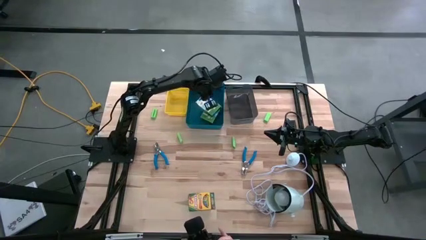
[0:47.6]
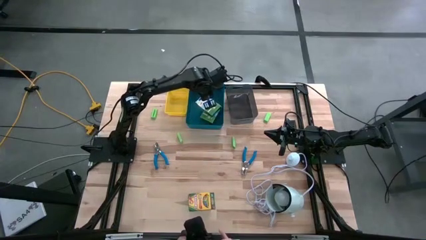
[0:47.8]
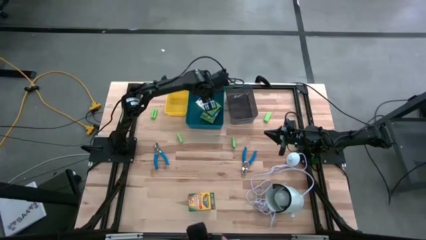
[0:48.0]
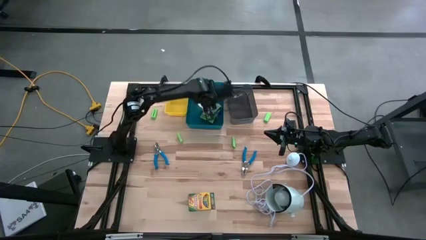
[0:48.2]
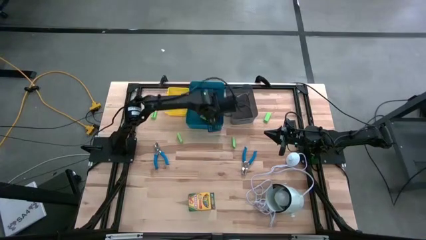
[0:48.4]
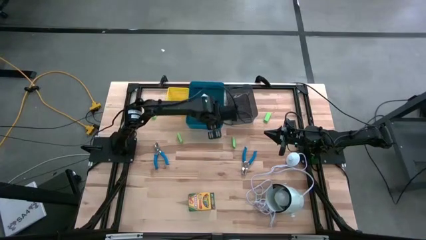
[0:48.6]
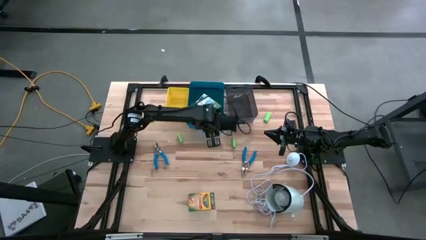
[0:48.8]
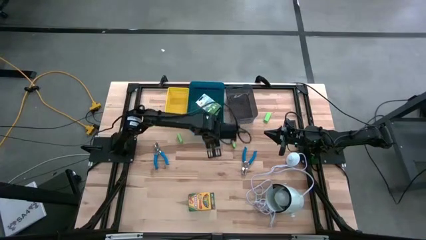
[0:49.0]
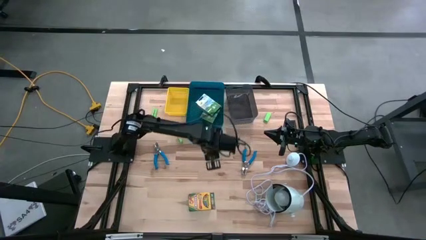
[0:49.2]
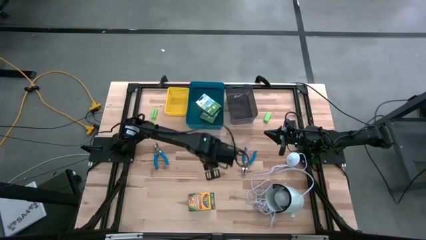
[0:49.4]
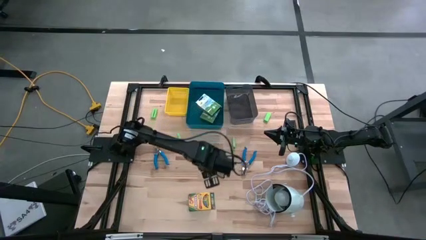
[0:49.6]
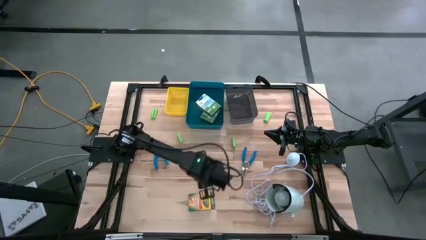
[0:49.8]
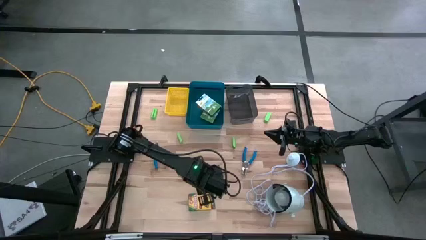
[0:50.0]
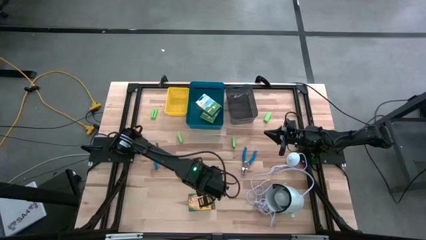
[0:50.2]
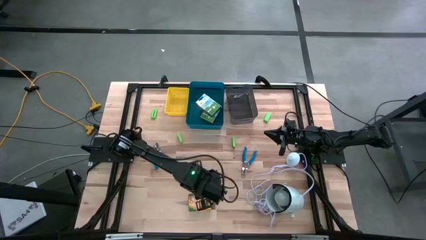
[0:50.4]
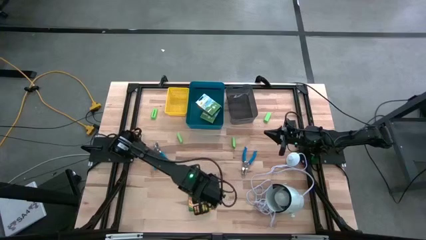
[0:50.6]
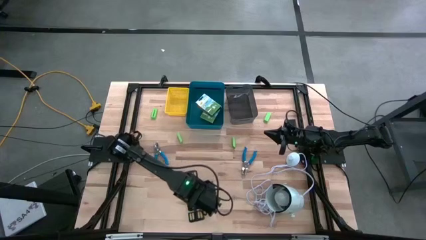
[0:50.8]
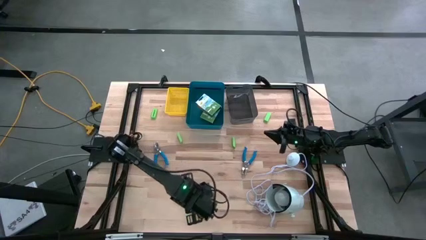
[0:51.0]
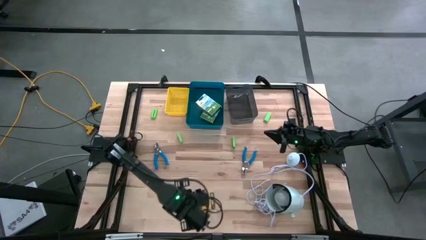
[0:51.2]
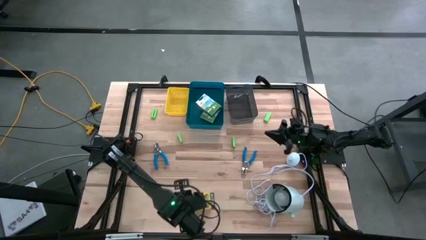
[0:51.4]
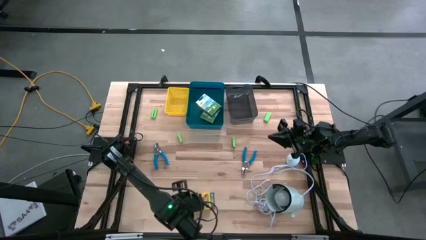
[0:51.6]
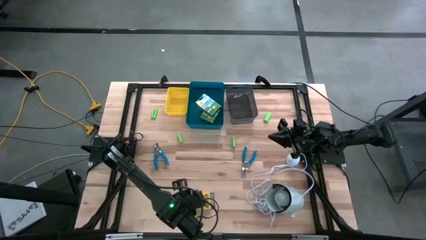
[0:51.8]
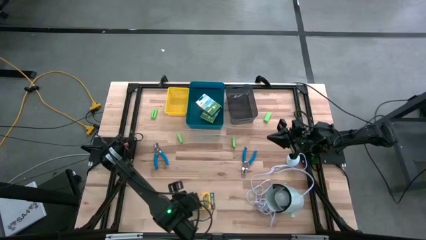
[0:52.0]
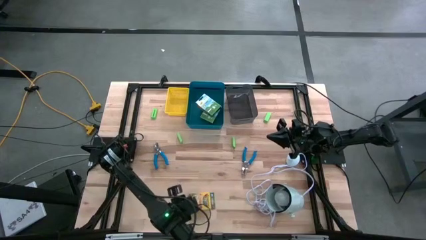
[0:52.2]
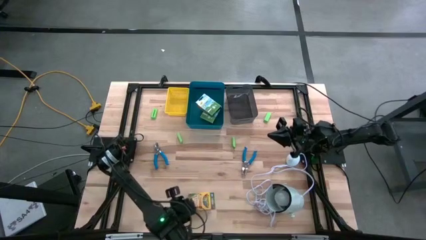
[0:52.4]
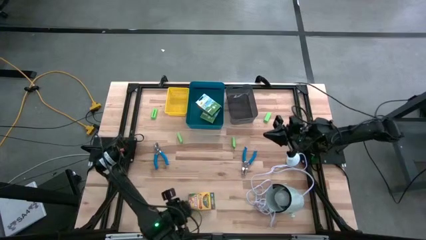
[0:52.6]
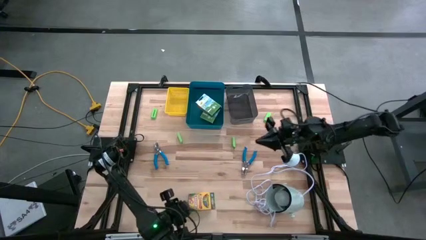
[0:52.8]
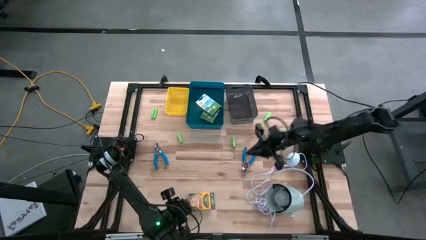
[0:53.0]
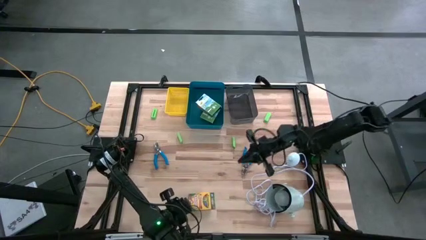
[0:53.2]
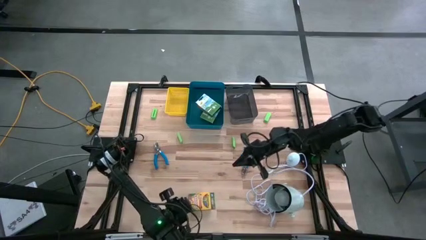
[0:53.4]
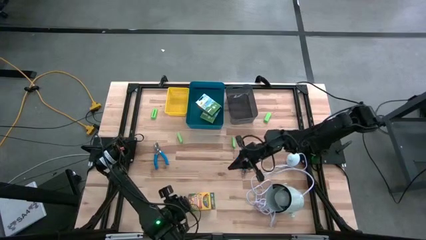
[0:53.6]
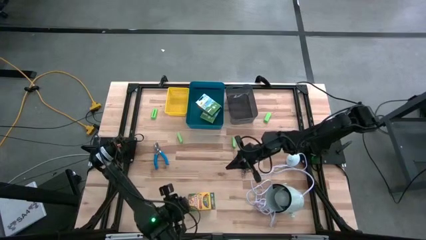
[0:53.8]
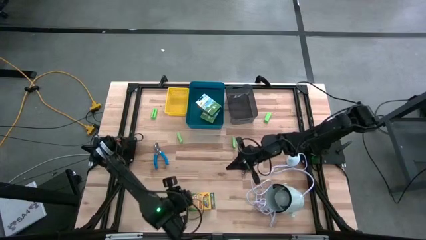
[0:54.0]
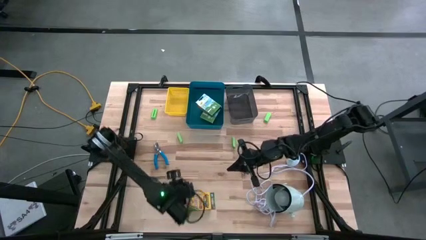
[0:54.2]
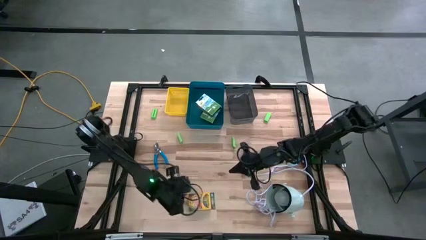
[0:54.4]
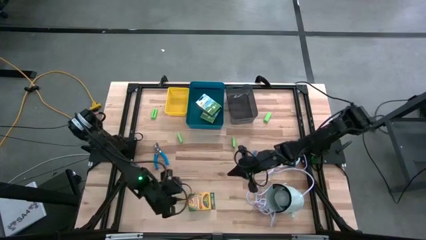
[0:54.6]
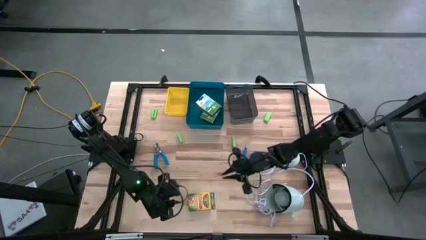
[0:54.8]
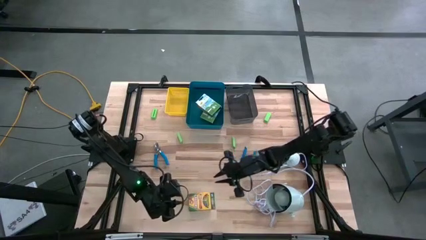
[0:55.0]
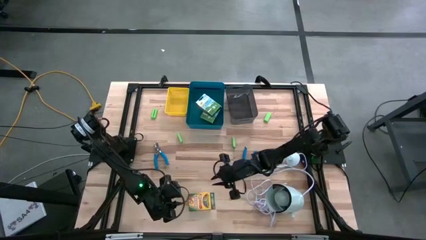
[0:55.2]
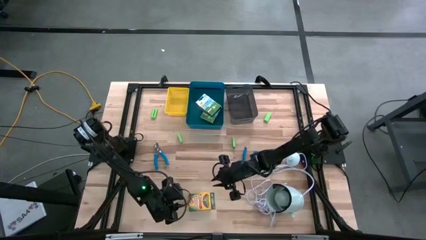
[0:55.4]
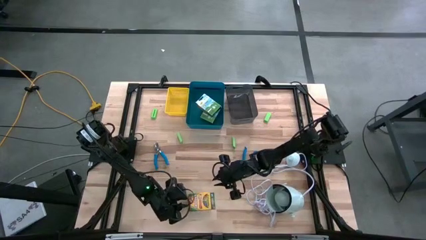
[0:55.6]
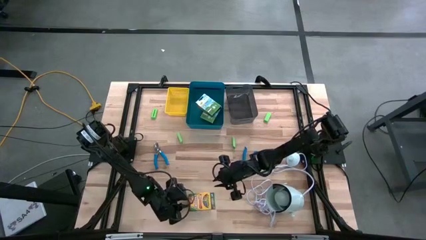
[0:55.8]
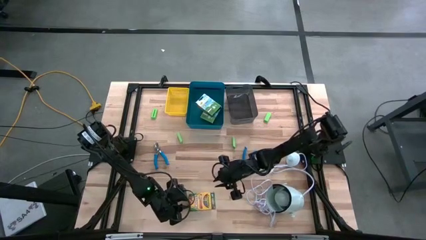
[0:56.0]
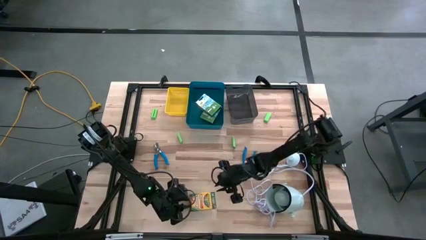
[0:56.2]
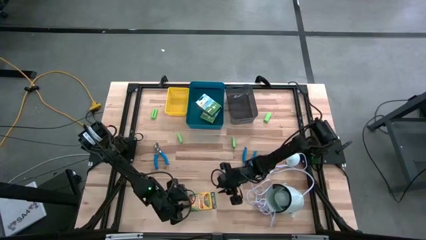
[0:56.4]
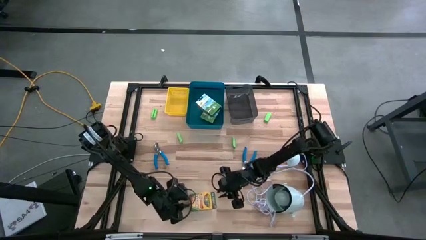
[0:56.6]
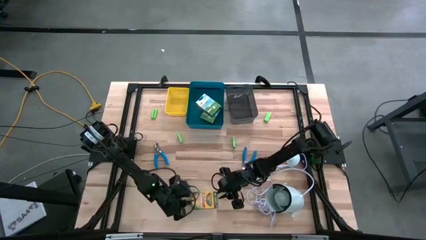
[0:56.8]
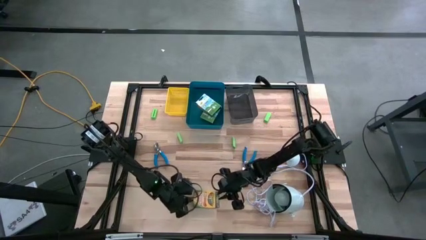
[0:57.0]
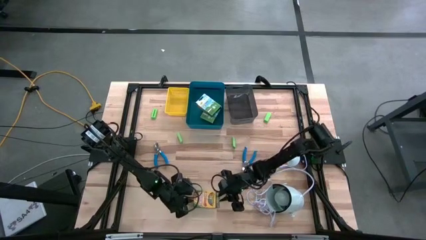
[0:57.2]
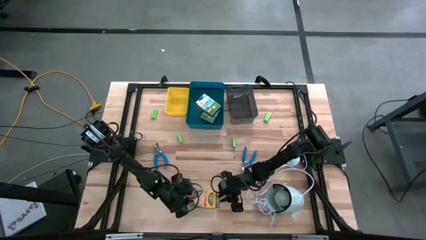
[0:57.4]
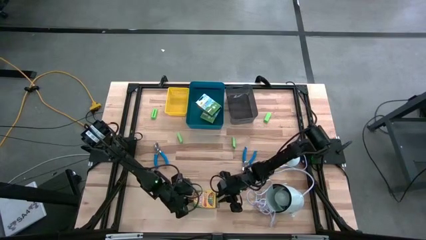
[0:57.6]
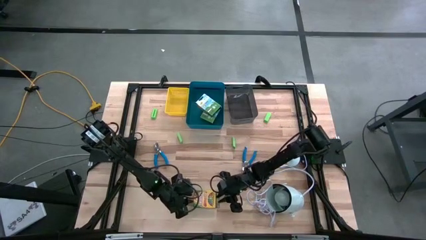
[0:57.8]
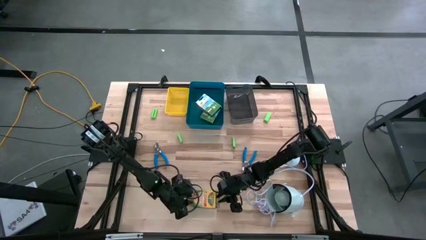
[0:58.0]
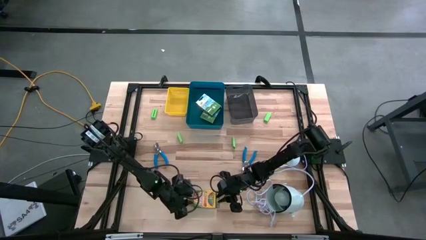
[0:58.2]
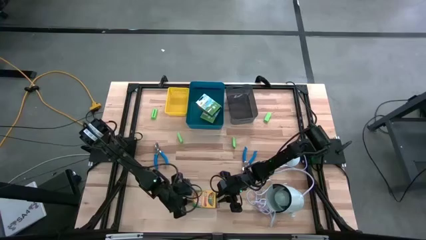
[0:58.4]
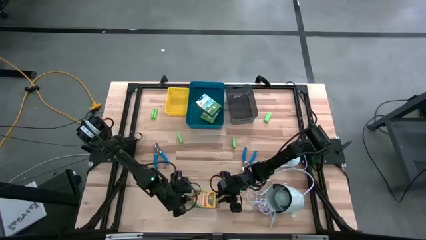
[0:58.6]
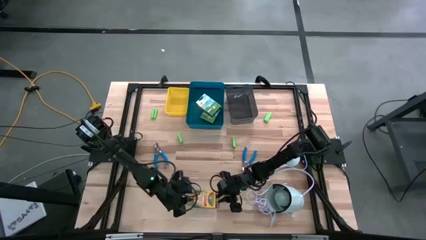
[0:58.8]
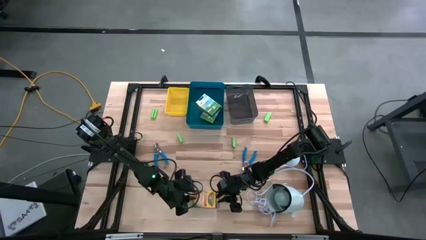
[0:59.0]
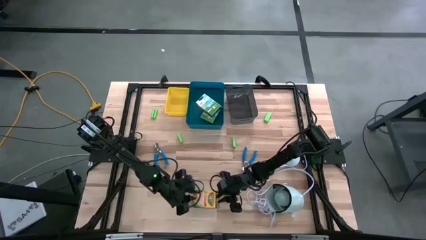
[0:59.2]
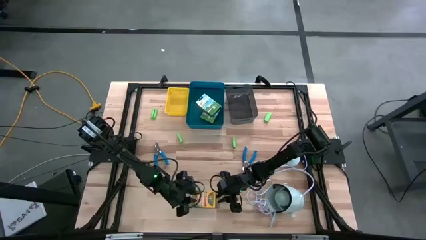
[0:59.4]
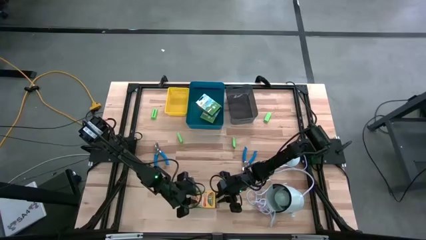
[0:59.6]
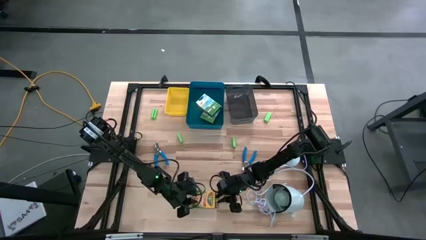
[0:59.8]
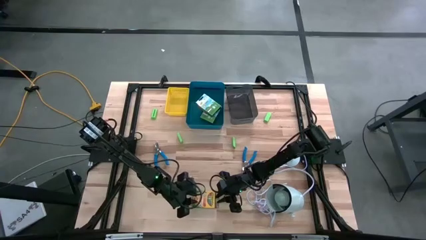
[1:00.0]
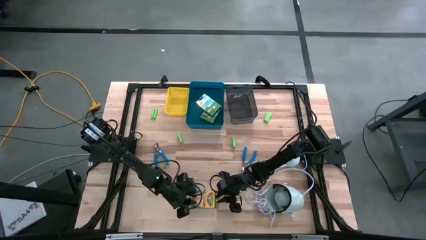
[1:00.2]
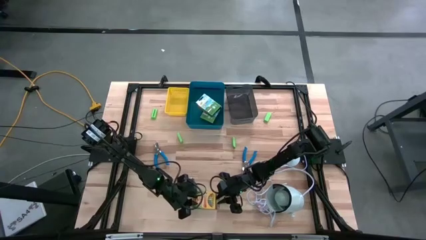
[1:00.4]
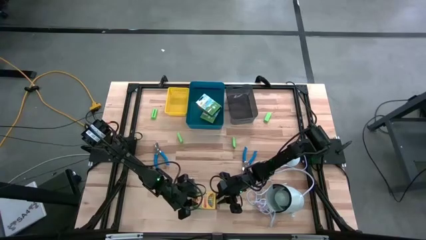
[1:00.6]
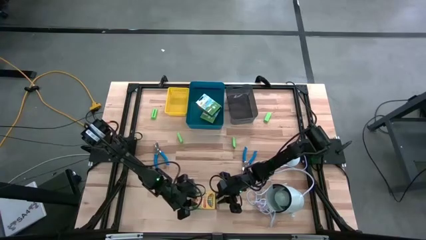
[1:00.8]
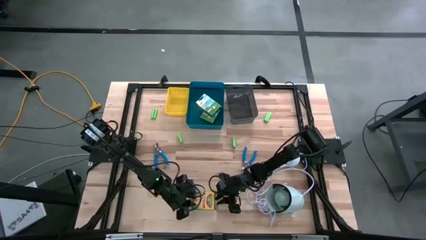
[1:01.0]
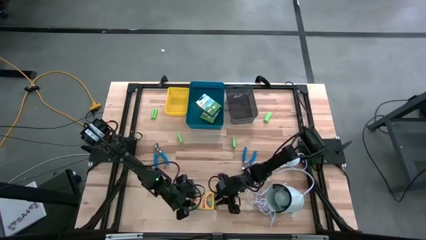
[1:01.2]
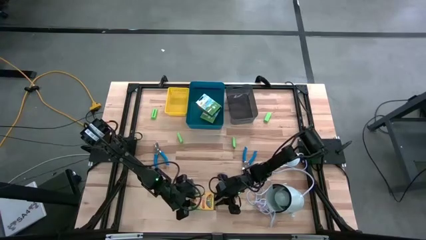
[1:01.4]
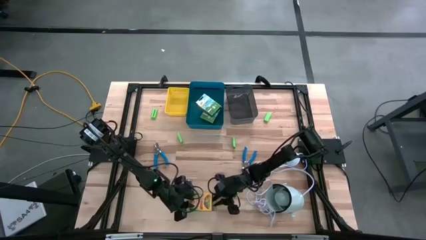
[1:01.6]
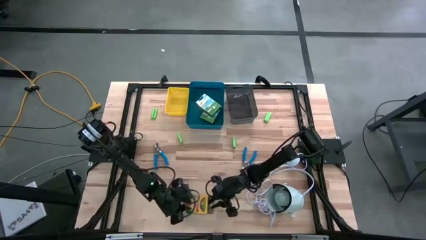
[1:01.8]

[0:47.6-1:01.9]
Task: Pick & Place School Supplies
Put the crayon box into the blue bin
